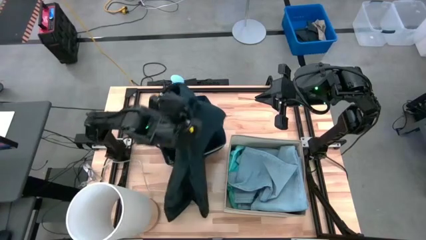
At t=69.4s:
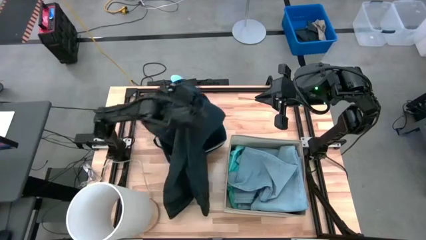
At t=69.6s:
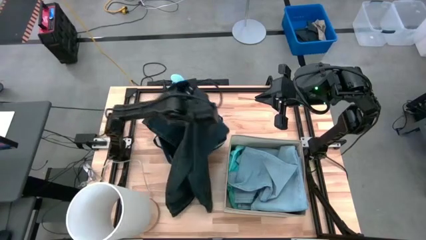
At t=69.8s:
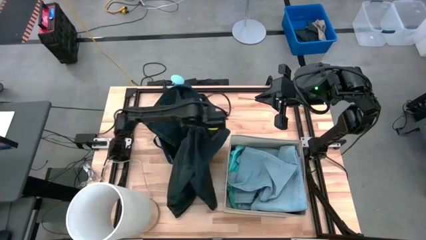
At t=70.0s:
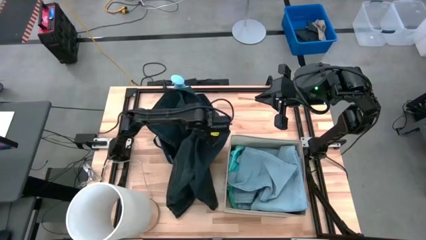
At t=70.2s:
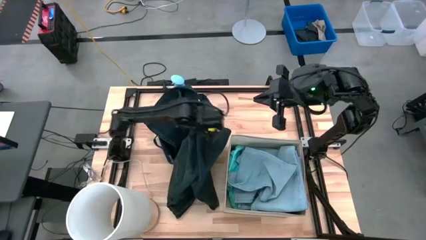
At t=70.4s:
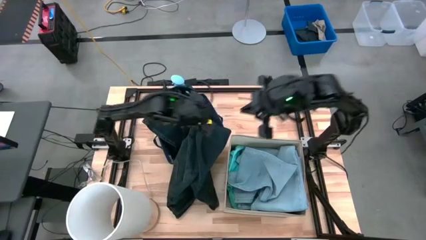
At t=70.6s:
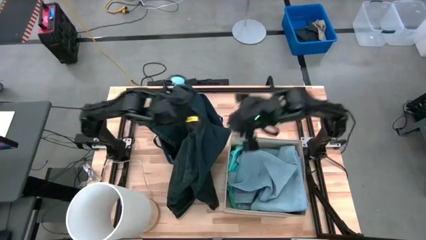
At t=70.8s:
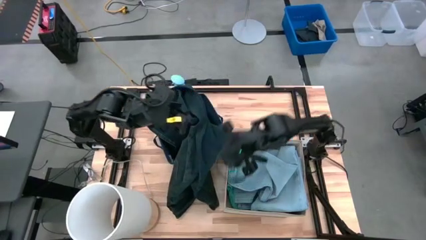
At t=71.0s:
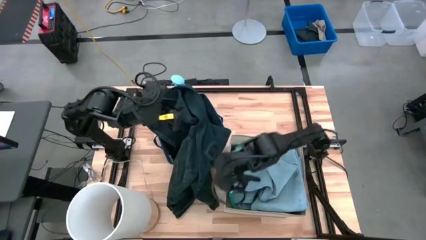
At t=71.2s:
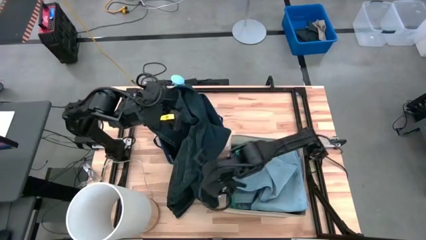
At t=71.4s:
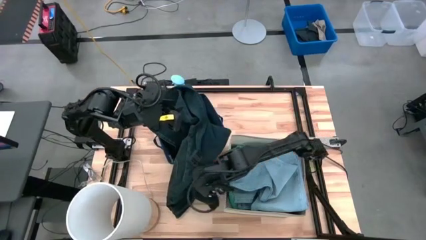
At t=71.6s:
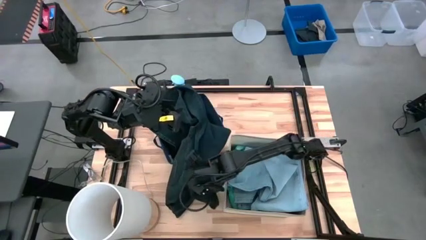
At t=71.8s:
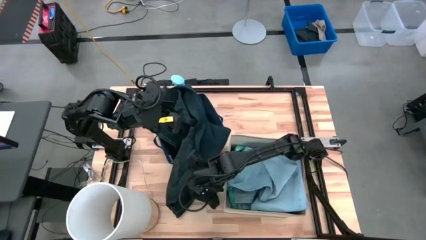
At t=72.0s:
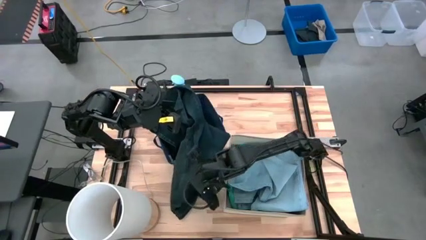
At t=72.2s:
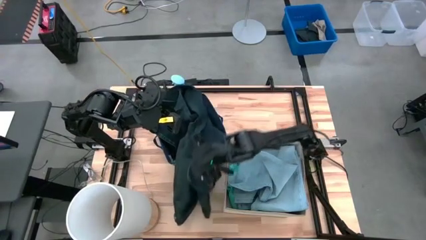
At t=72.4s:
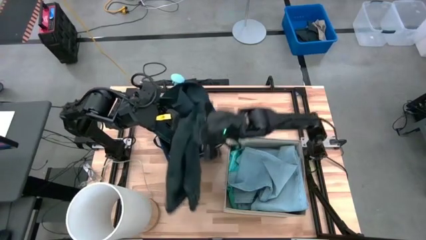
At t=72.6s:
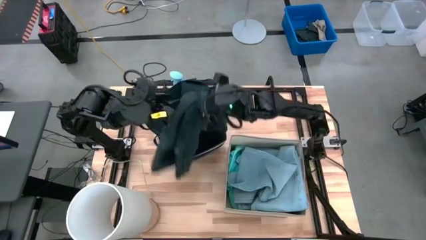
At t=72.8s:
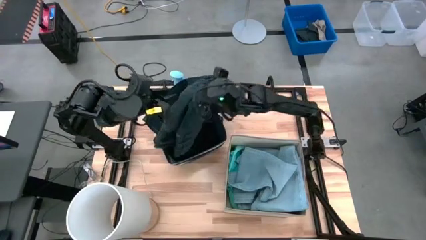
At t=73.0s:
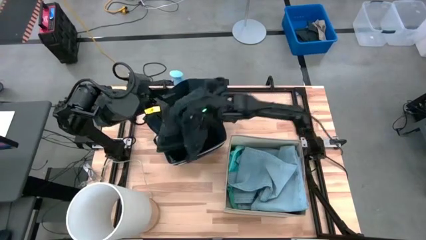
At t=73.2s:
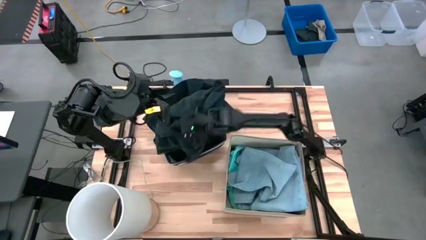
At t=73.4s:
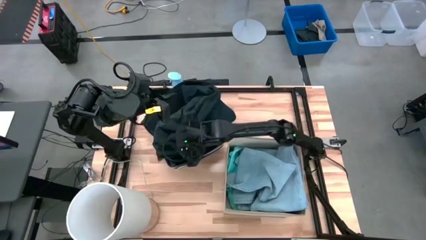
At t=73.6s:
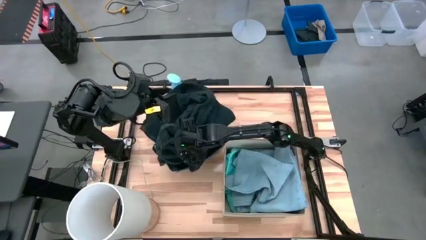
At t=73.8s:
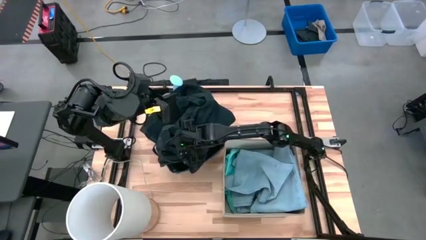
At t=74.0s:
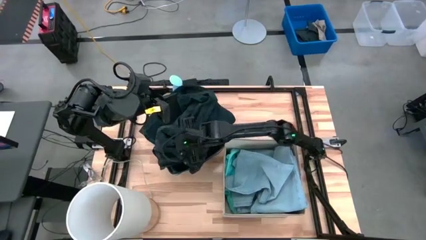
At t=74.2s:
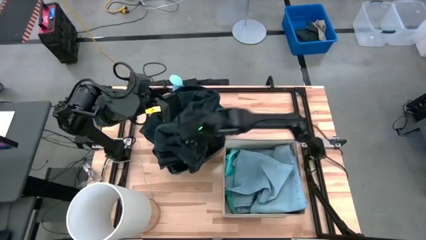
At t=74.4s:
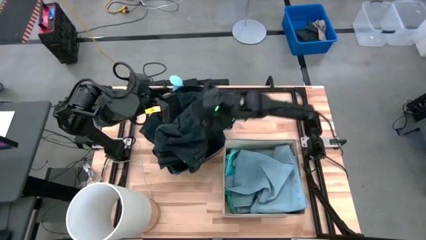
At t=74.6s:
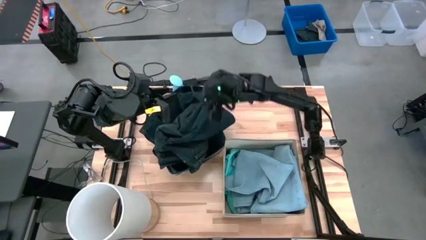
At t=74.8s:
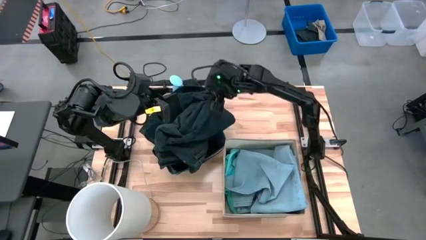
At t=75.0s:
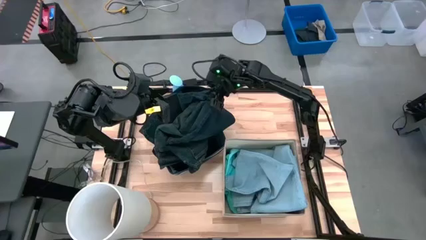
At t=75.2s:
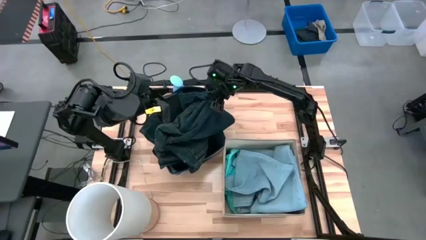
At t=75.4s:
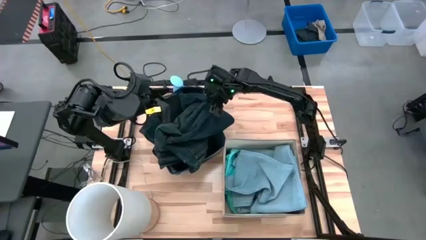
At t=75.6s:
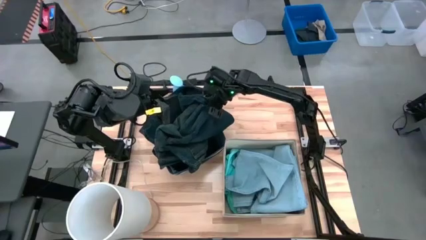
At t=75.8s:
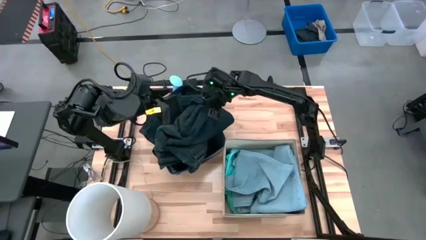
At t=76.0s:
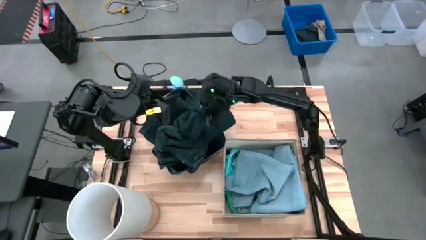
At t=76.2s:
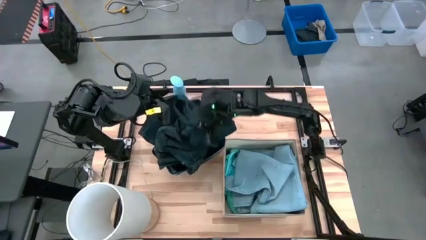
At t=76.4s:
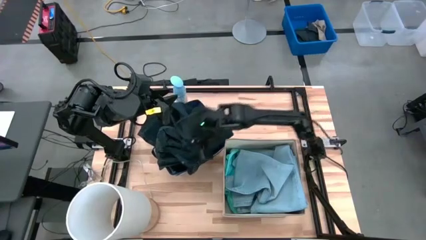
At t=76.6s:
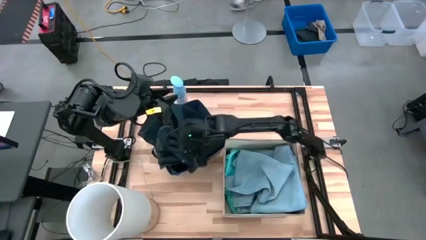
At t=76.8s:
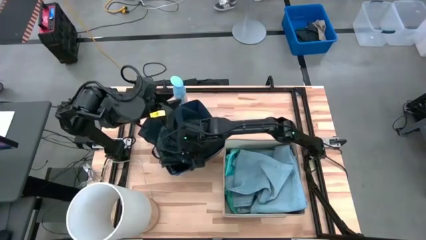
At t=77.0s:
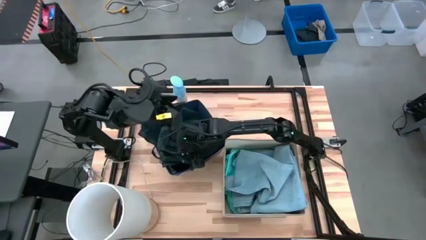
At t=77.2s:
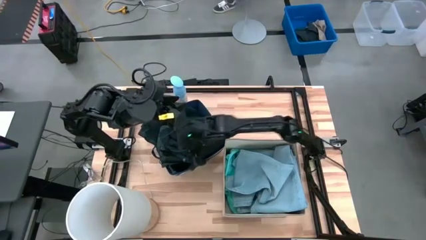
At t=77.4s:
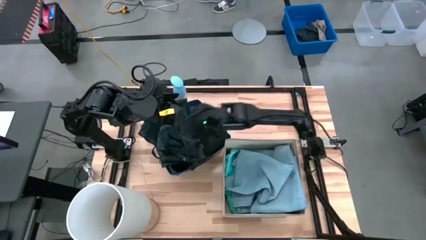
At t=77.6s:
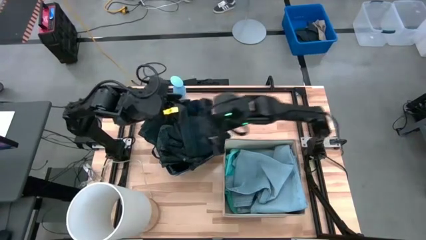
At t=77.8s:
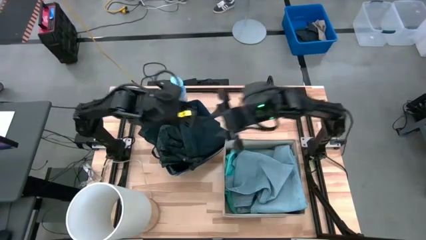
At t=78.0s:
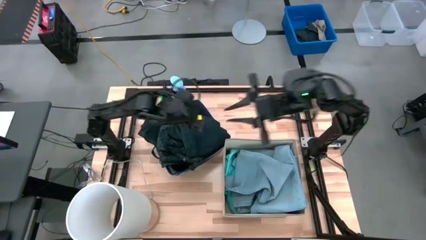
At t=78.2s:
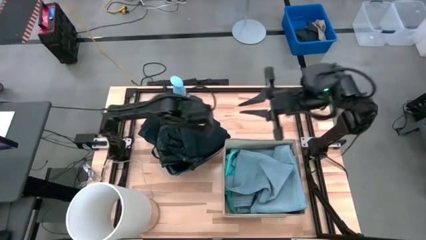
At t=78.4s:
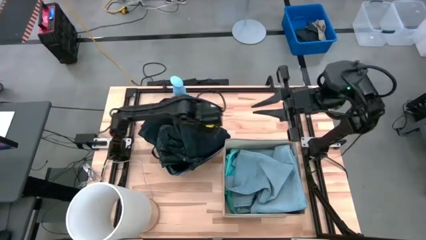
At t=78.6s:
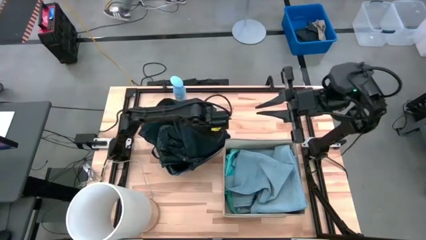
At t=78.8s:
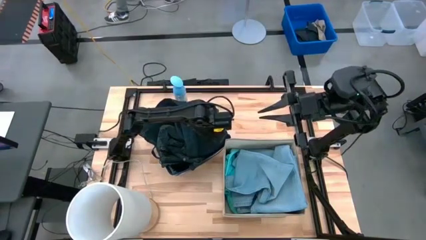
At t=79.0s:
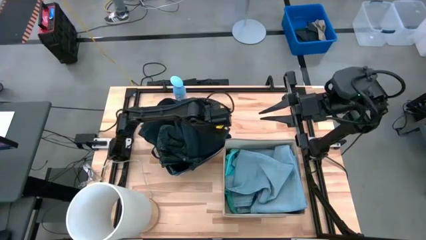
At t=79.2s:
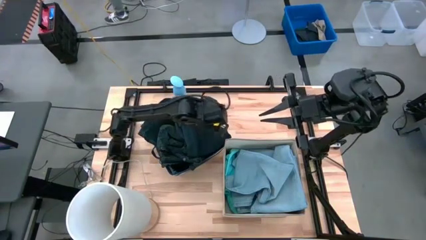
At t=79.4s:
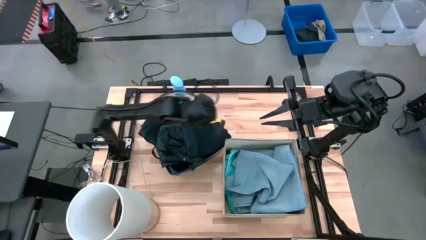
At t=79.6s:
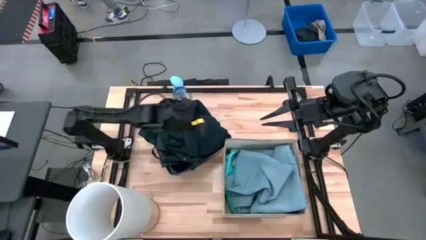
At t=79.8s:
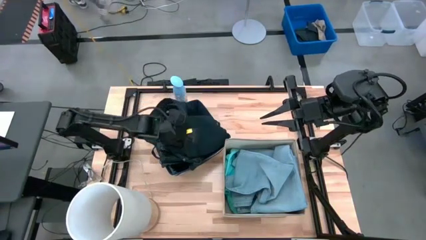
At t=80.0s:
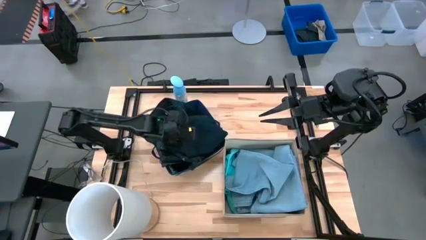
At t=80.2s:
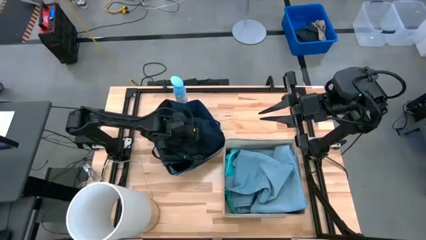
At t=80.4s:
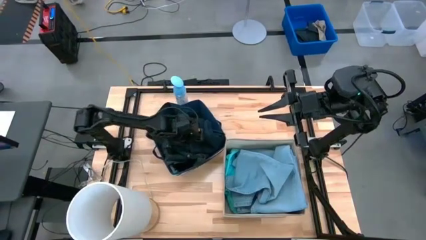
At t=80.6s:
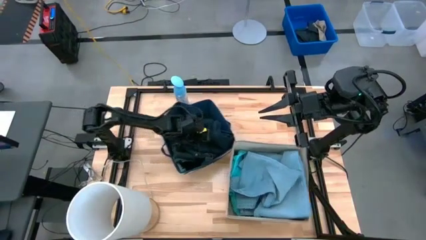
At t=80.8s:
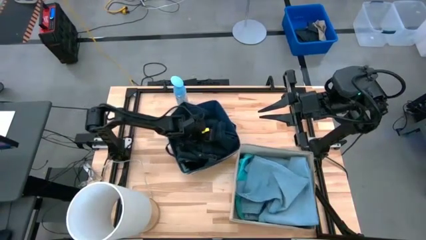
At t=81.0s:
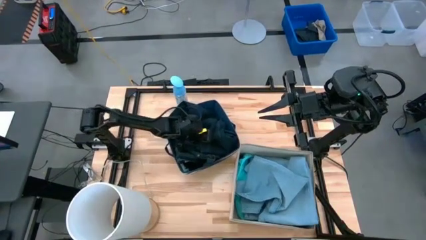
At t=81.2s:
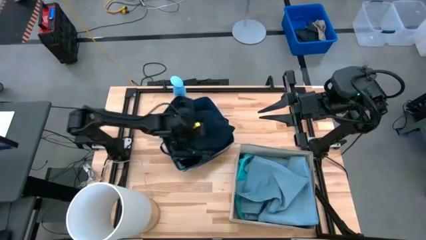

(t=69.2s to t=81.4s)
Task: Sort clothes
Put the dark blue pants into the blue laundry organizer

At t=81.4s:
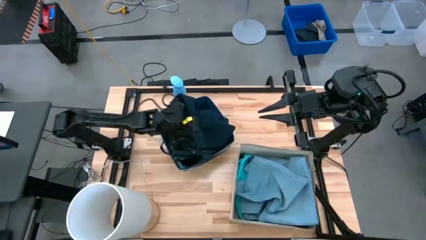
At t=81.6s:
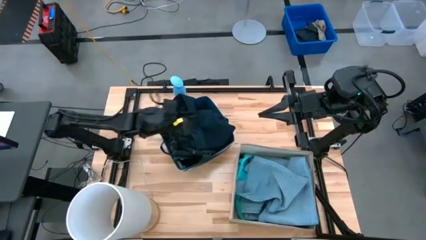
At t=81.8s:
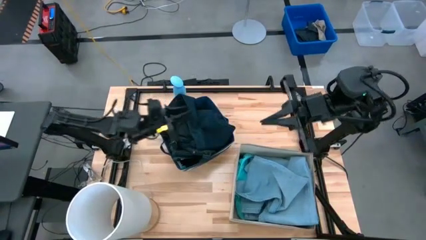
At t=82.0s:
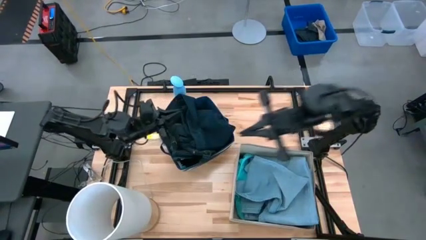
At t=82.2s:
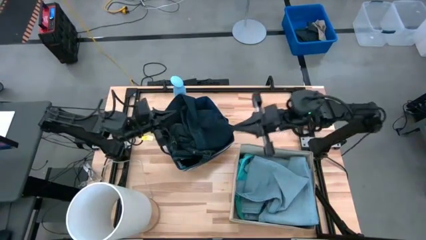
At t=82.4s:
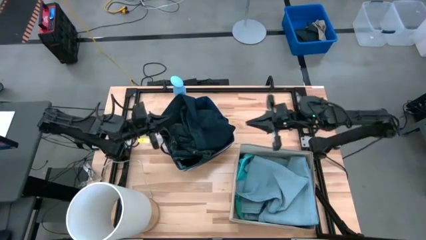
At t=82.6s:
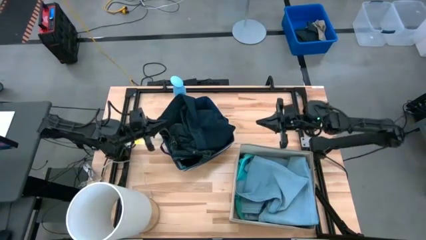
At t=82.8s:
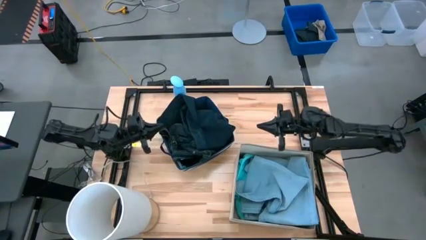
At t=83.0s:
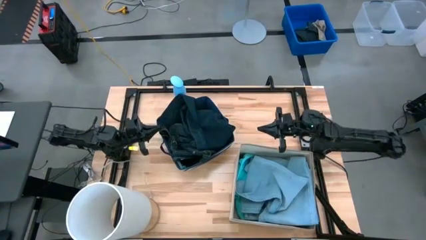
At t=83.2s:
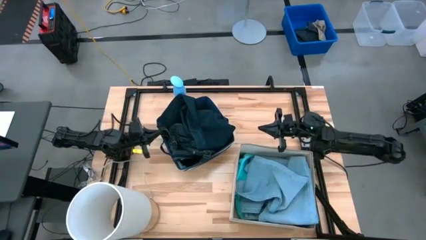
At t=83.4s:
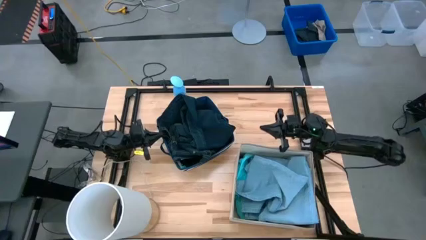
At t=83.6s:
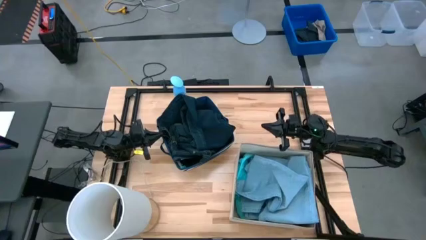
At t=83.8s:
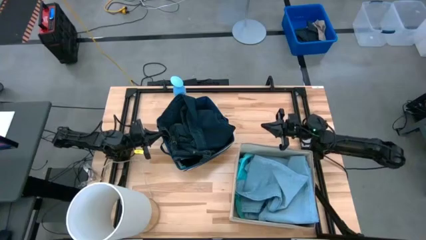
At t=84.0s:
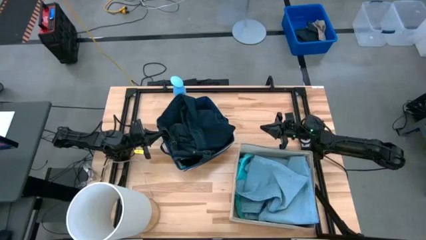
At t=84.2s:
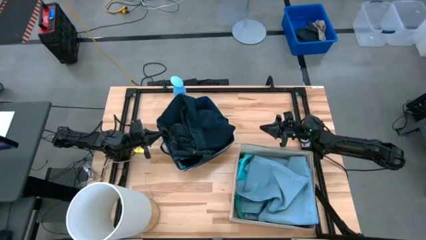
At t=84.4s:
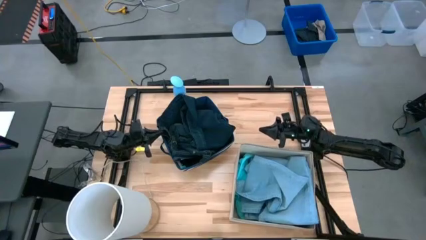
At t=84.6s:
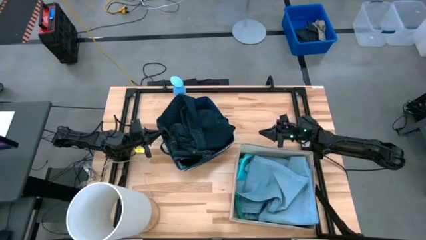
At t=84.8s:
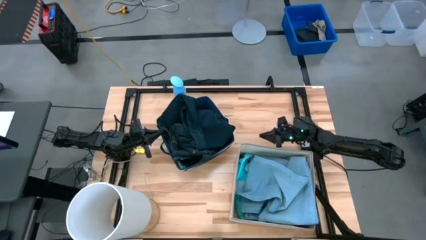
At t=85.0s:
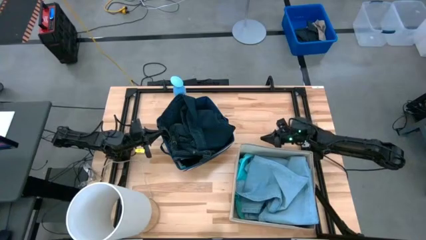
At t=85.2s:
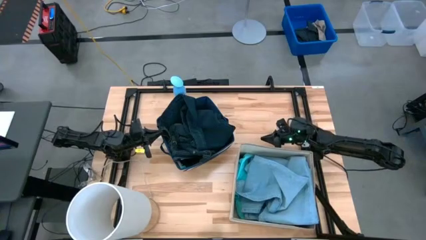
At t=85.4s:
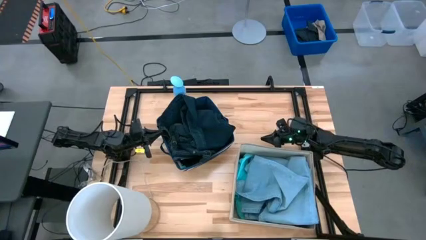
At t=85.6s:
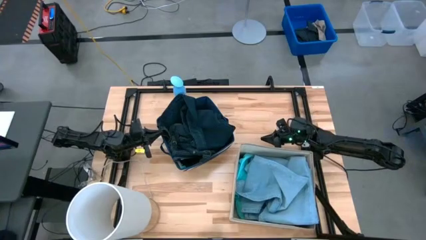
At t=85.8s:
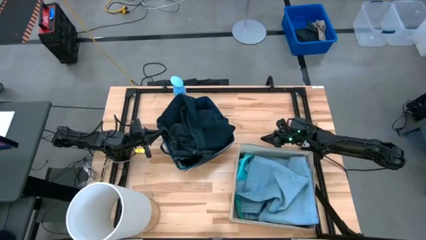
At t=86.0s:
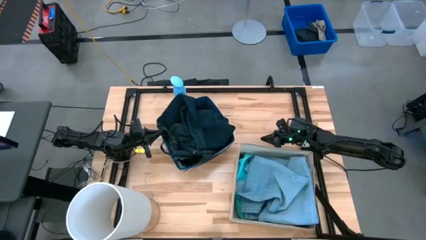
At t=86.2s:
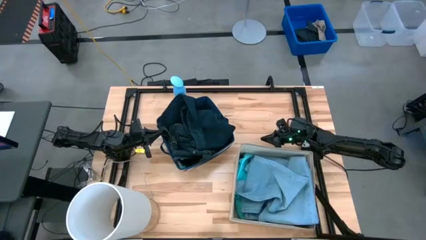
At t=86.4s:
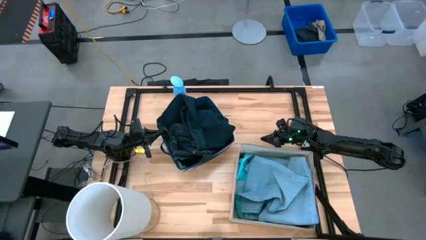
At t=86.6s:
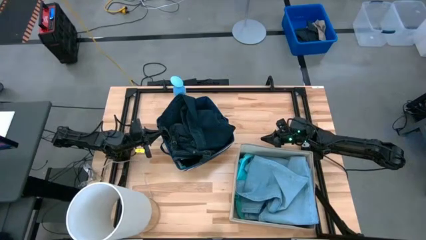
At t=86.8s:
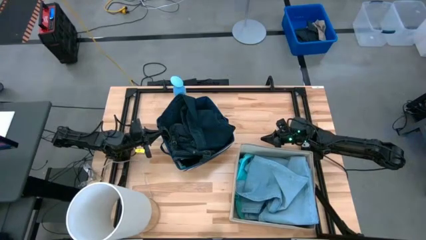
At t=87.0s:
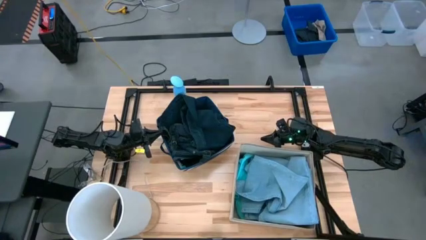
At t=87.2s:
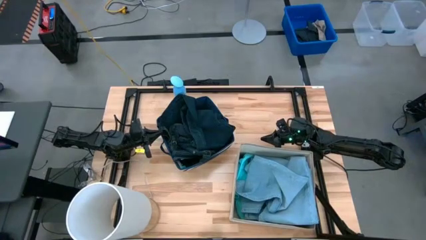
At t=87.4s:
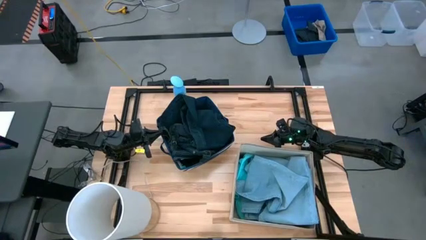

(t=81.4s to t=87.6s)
Return to Home Position
